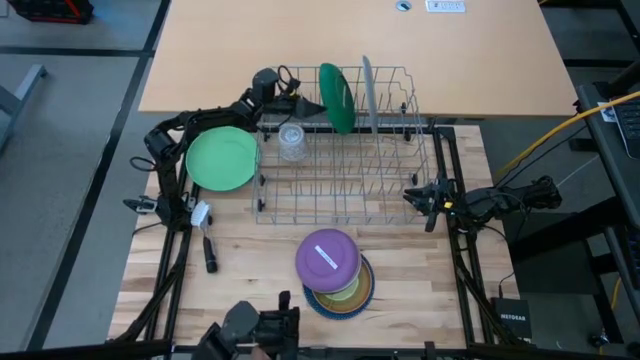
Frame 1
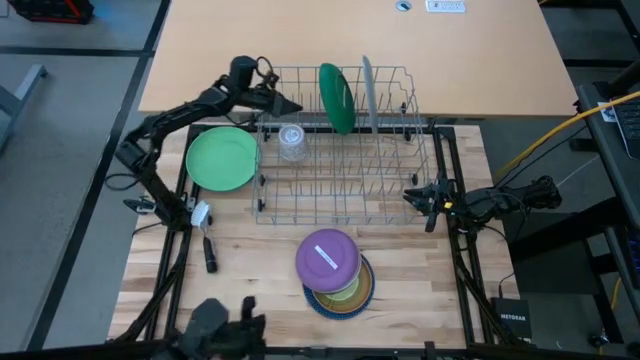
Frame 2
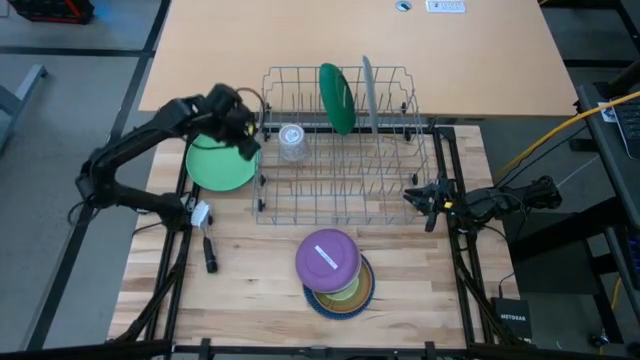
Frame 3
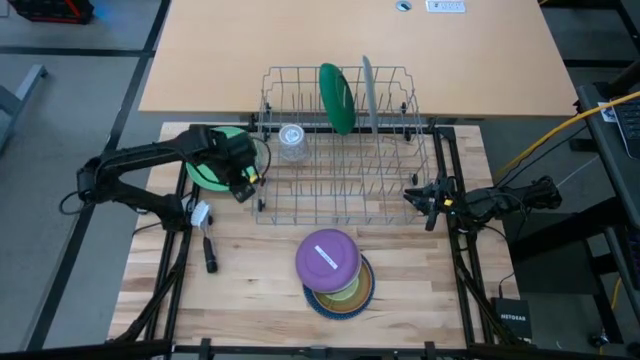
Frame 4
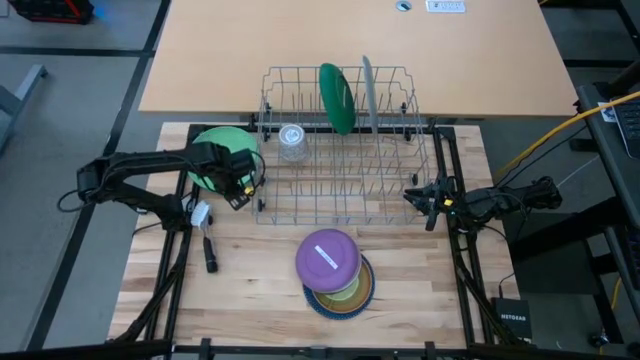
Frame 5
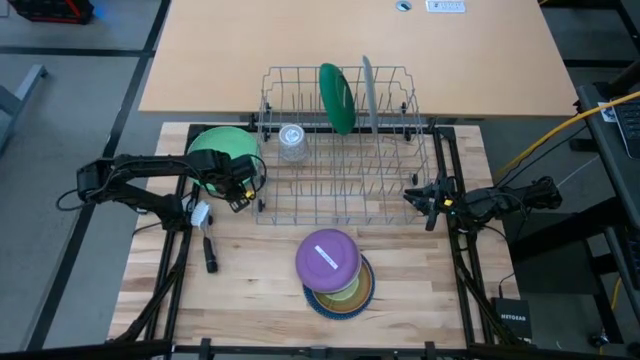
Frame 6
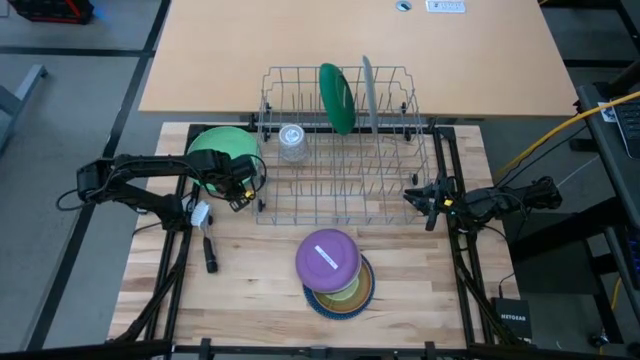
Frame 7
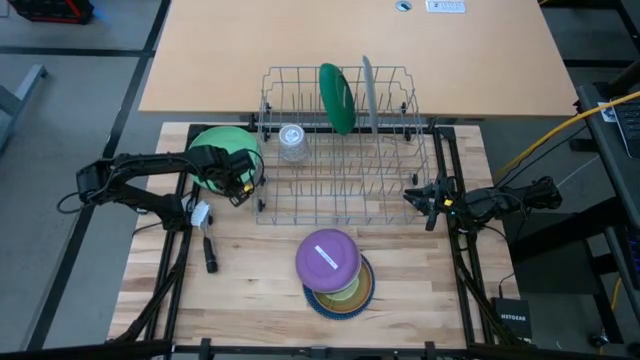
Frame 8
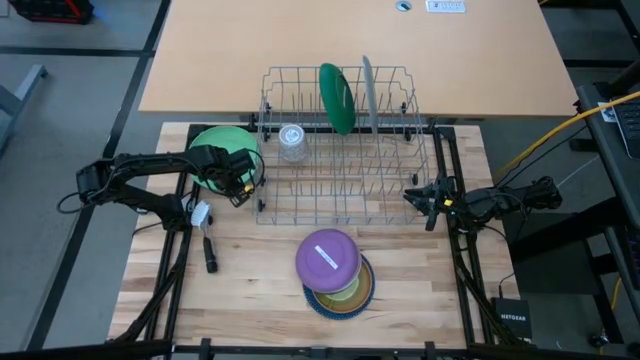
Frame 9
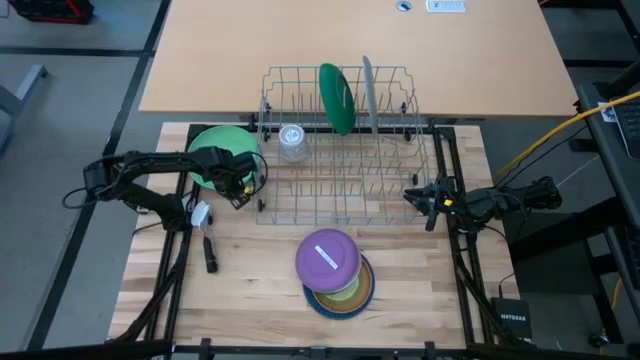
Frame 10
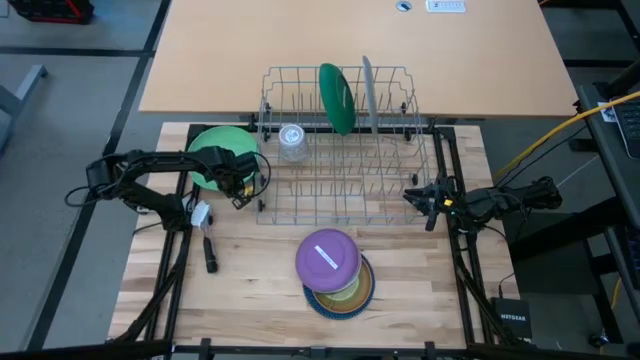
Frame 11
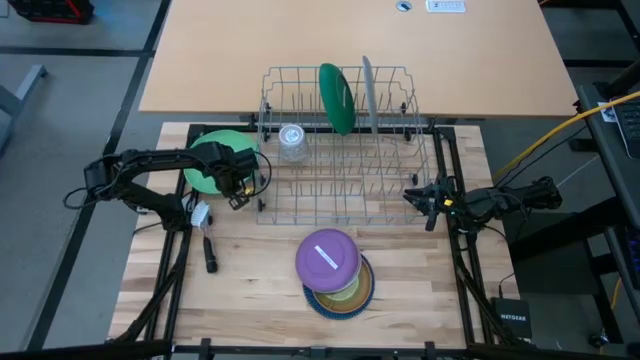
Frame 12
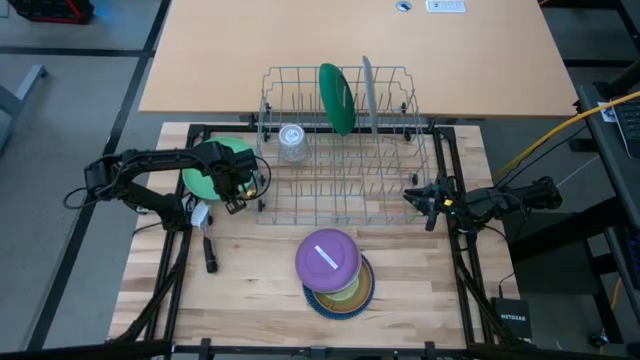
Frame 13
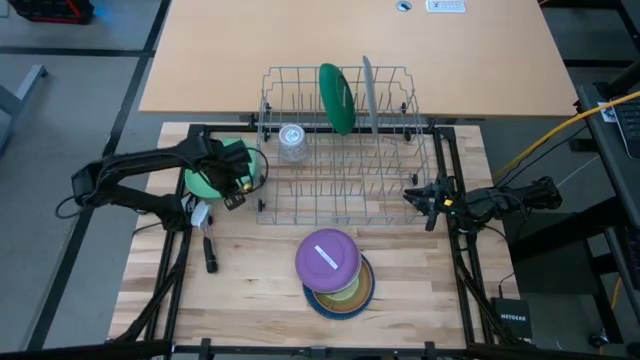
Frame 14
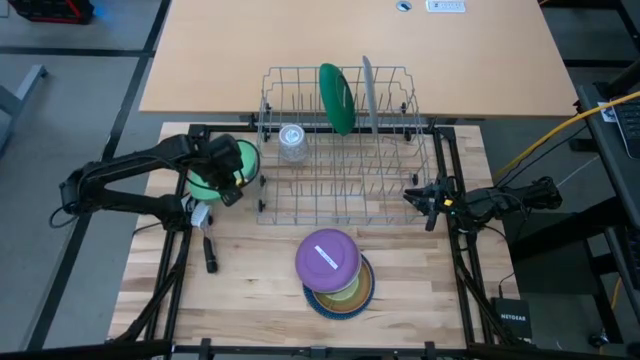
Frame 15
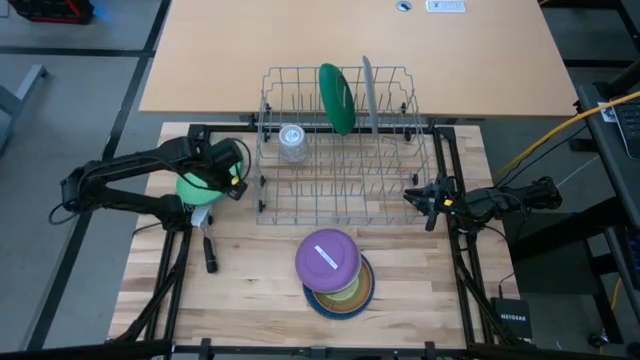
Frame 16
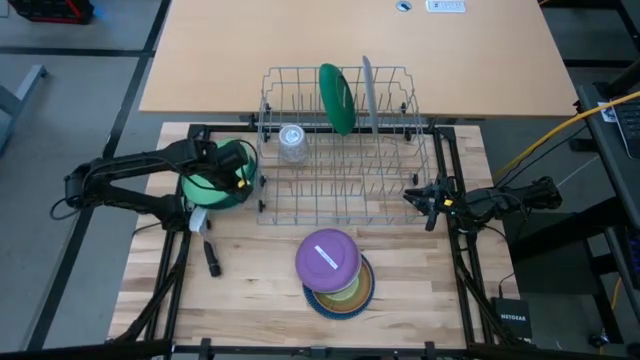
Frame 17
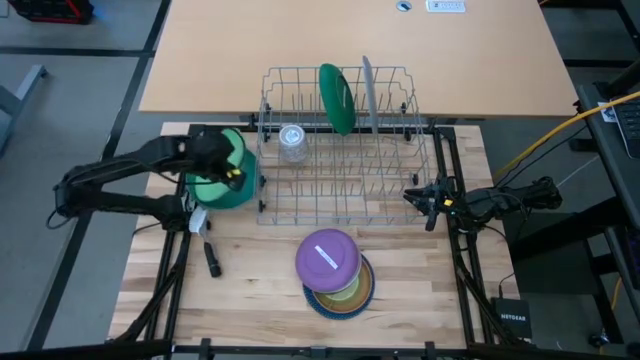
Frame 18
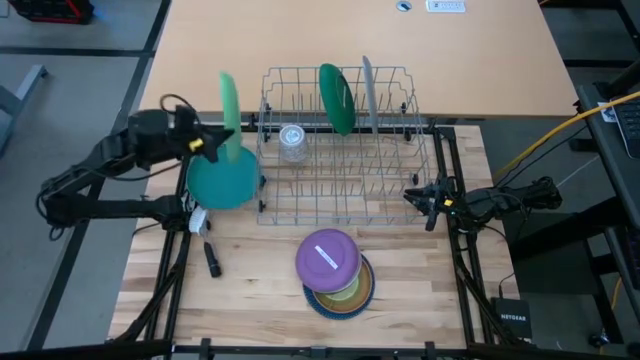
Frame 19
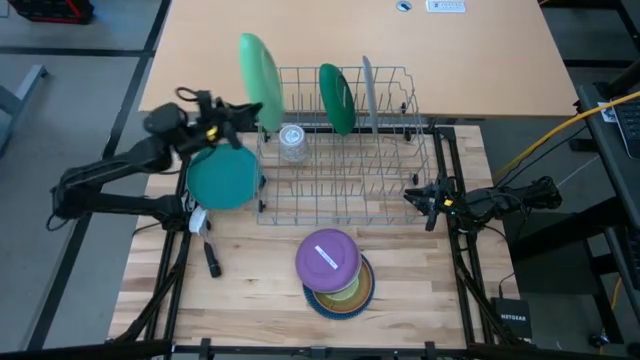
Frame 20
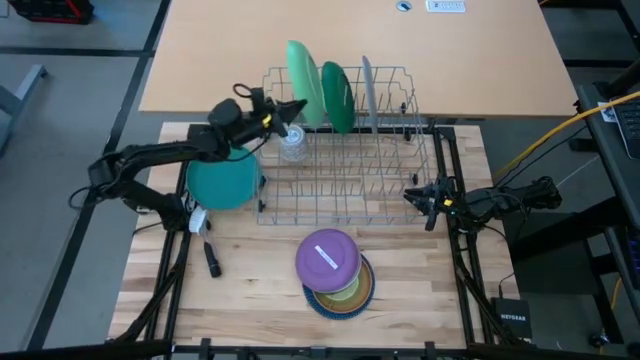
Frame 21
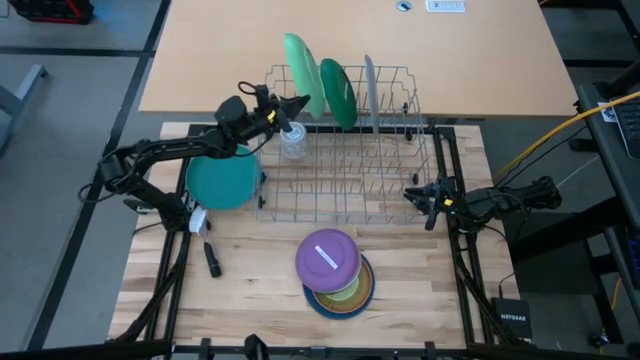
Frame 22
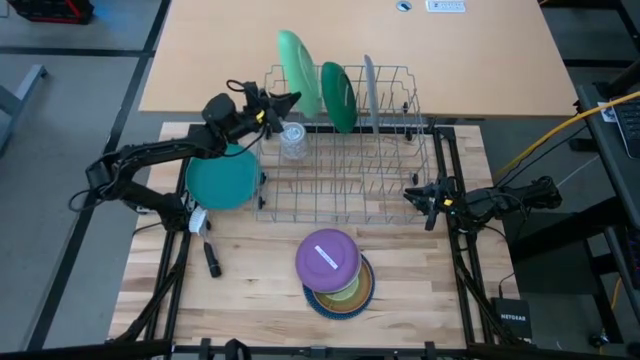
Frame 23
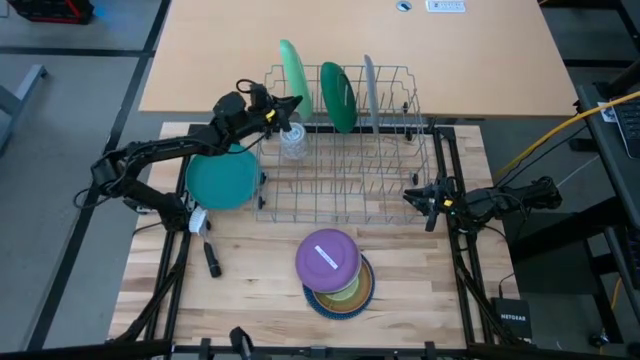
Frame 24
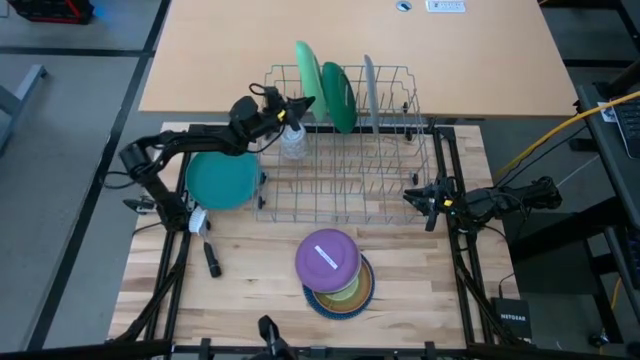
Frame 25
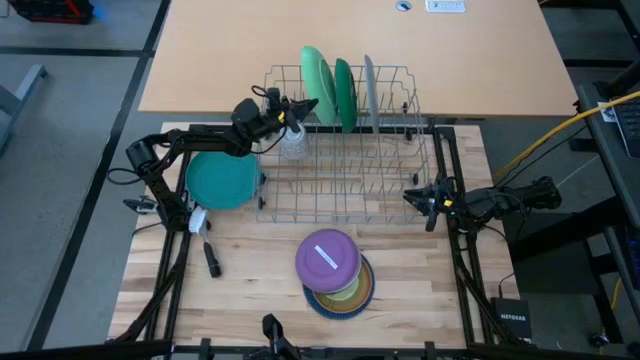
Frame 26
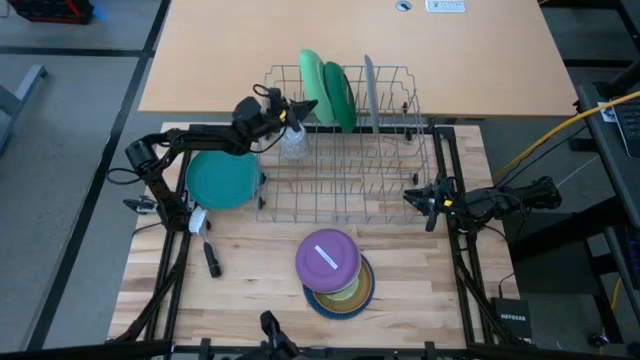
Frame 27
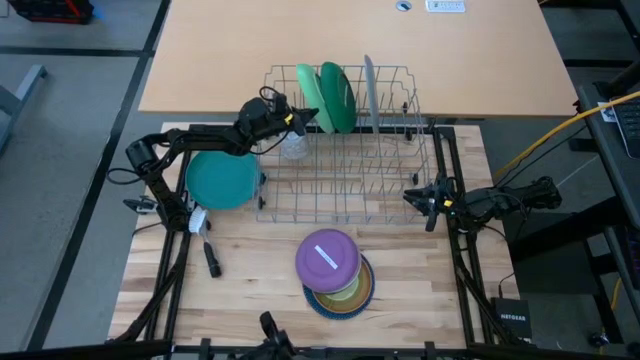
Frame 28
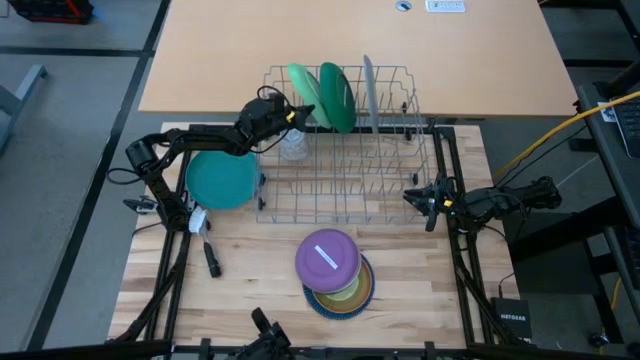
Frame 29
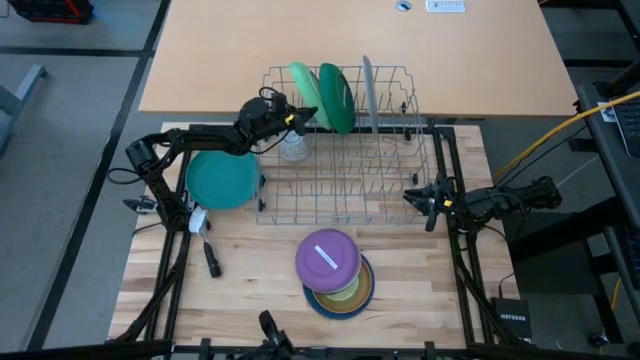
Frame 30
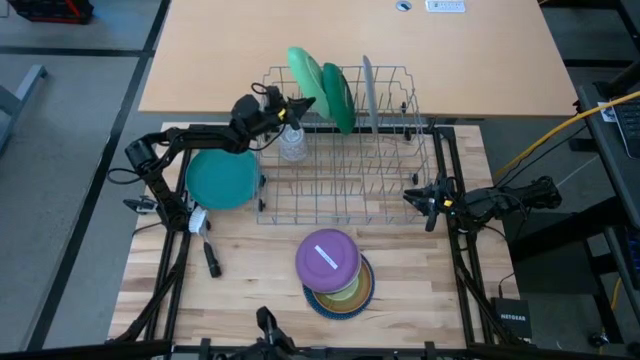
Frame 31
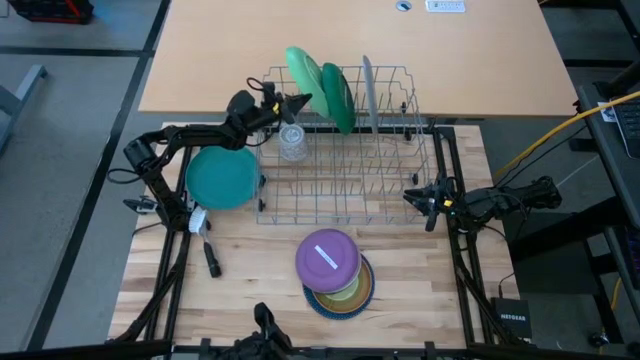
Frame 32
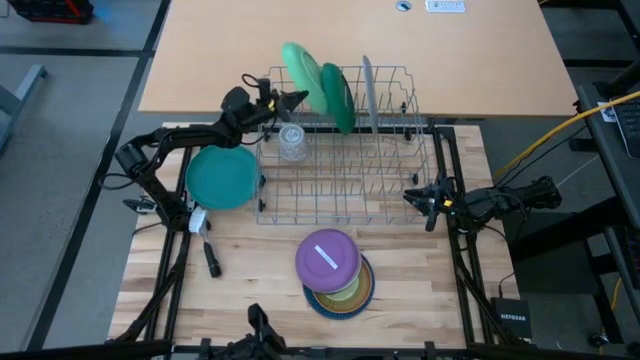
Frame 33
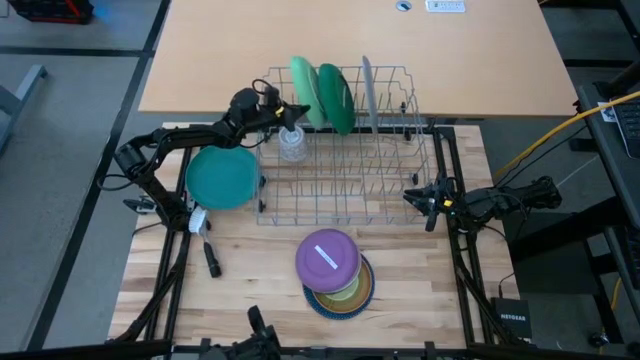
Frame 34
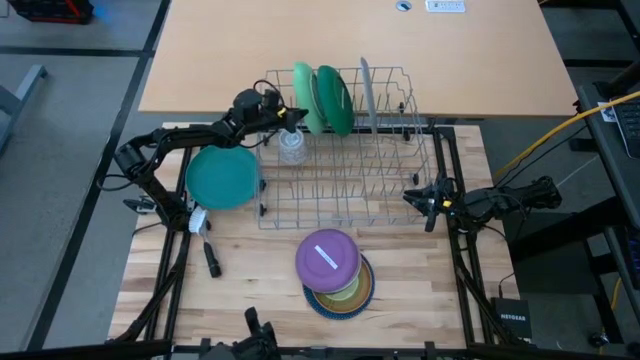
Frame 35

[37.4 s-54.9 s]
Task: Sort dishes
Put the light green plate in the dish rack

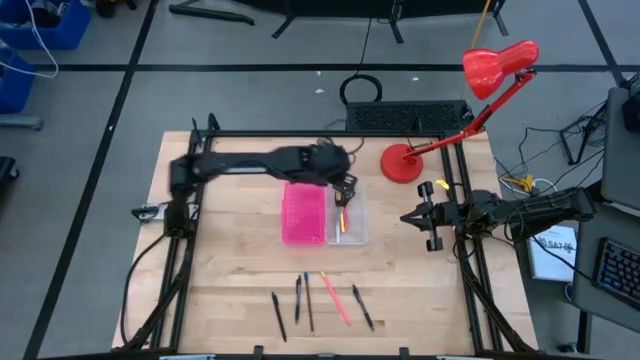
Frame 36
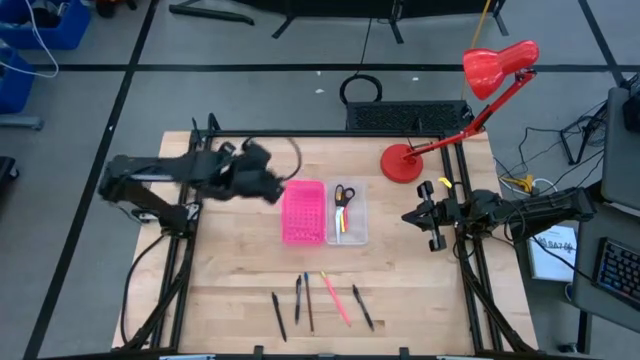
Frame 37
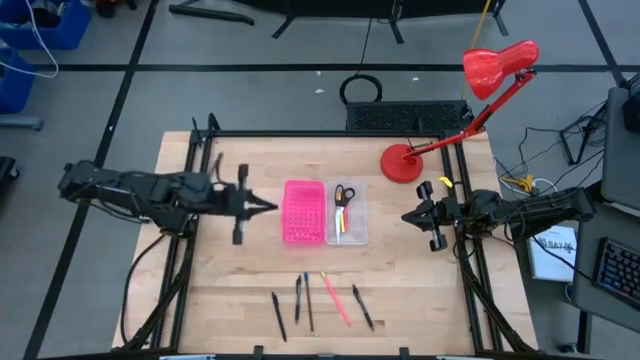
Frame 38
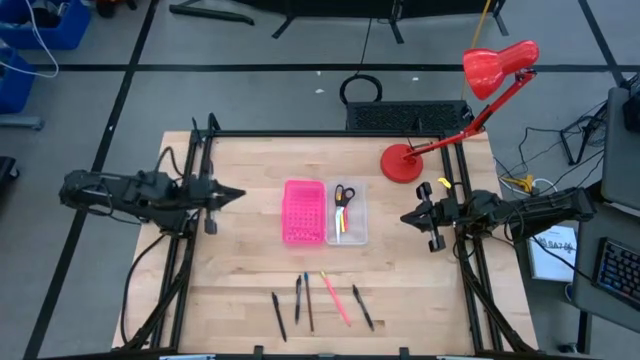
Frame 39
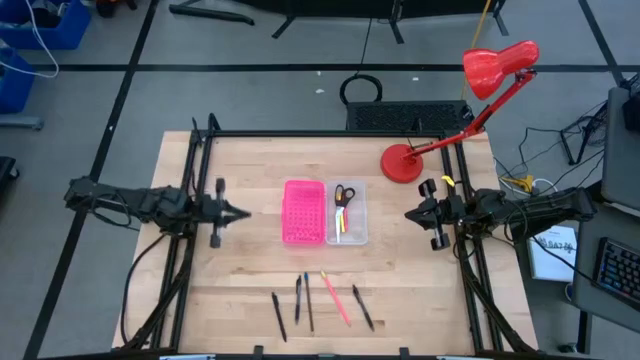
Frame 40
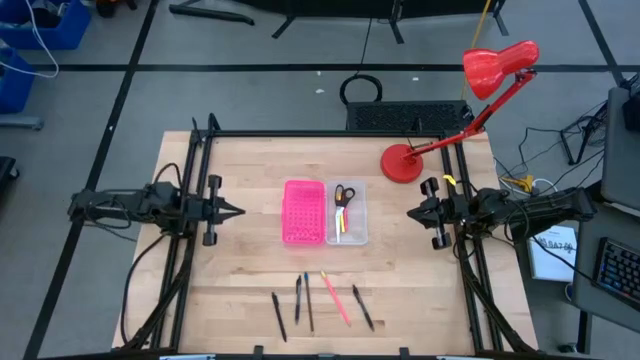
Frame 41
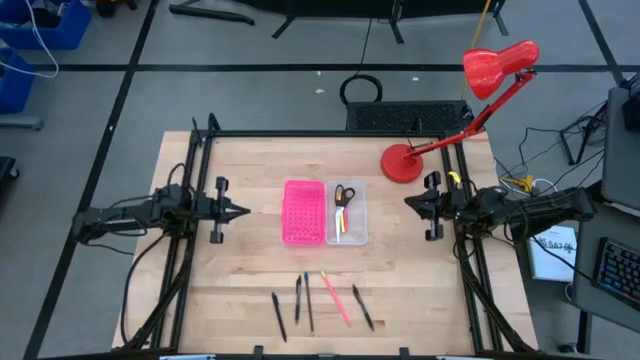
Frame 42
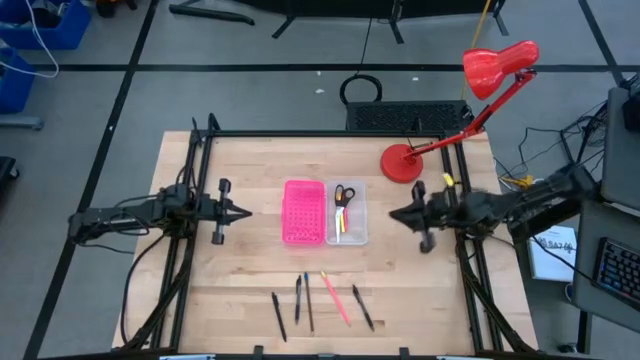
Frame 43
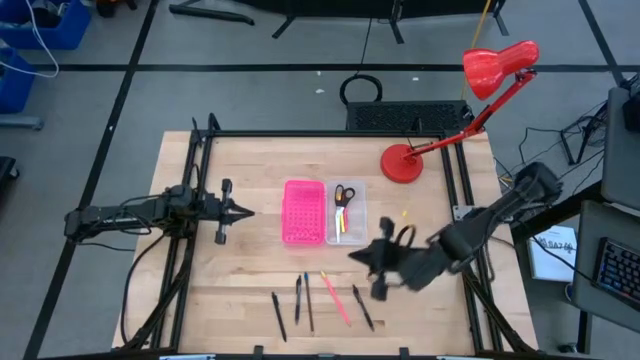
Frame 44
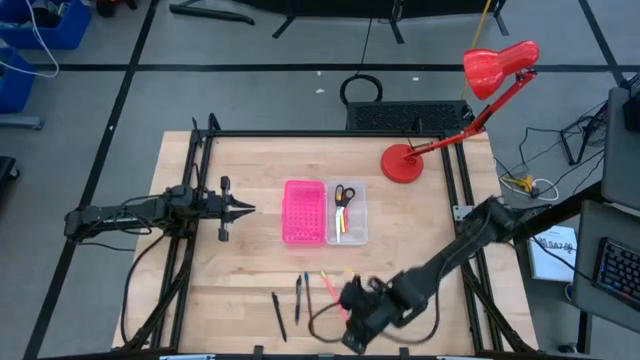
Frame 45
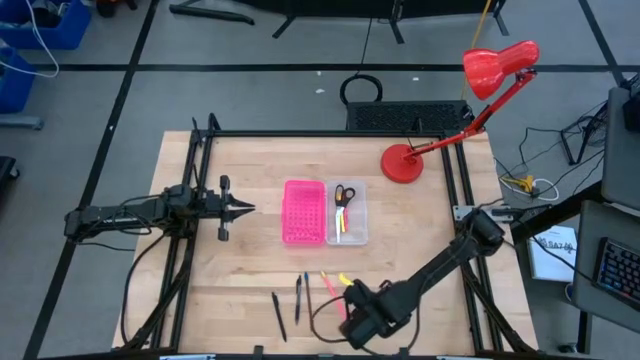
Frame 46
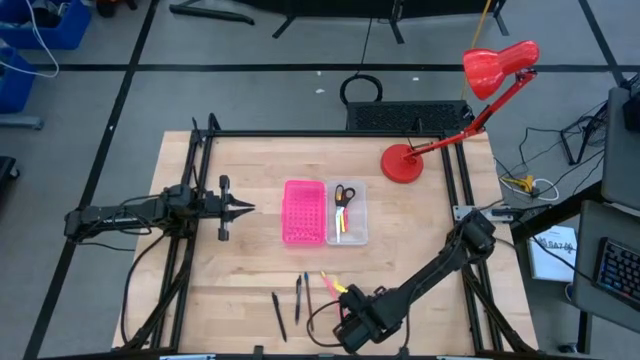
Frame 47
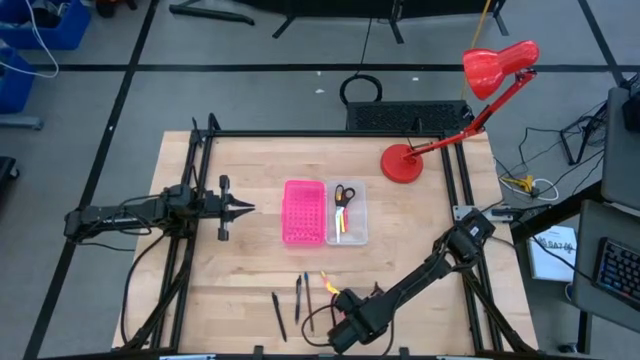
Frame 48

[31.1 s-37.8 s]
Task: Pick & place school supplies into a supply box
Put the right transparent black pen into the supply box
